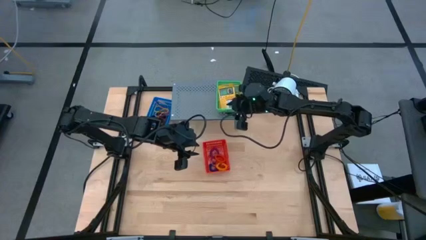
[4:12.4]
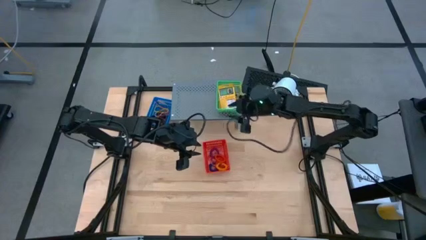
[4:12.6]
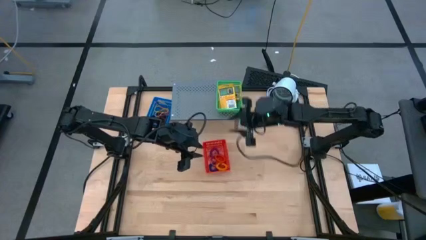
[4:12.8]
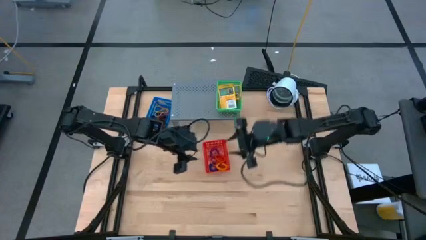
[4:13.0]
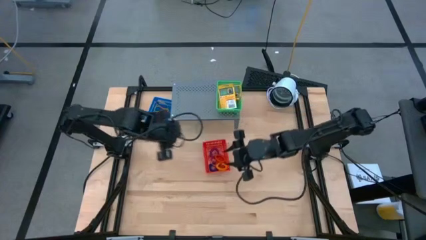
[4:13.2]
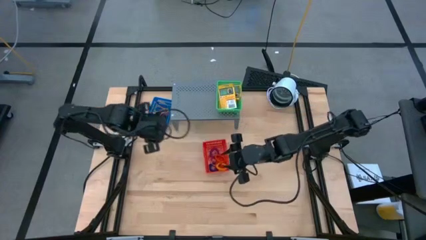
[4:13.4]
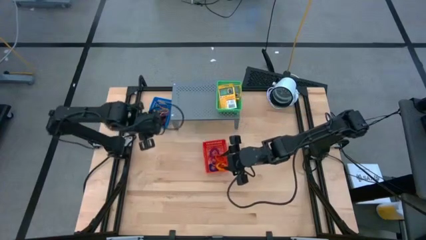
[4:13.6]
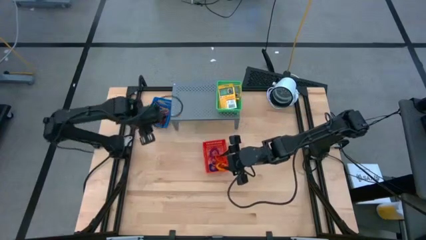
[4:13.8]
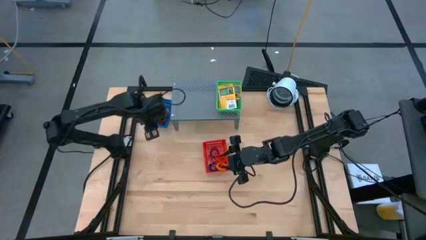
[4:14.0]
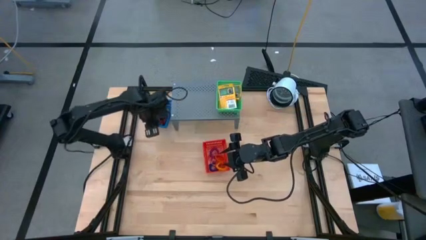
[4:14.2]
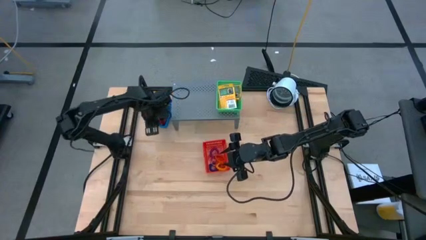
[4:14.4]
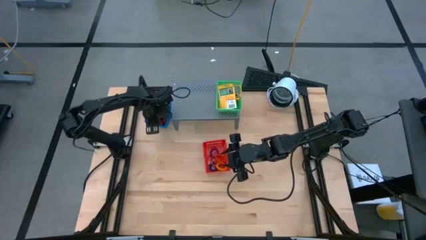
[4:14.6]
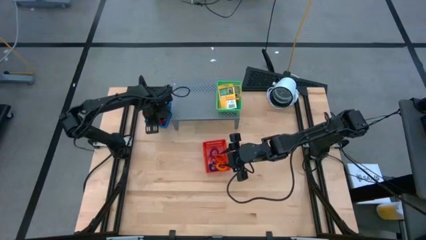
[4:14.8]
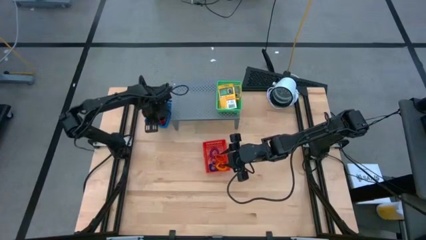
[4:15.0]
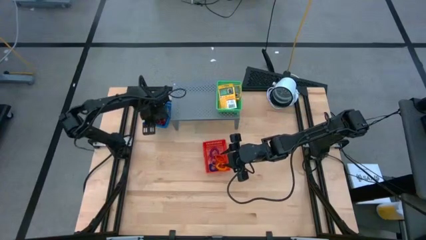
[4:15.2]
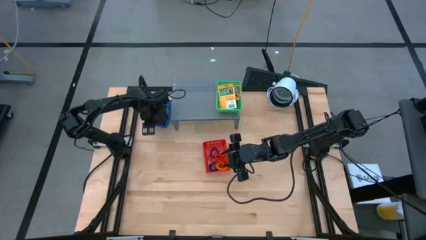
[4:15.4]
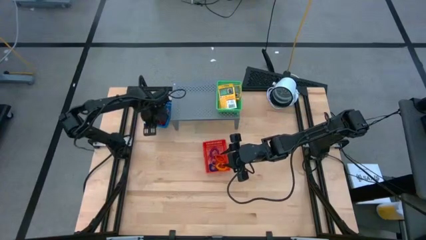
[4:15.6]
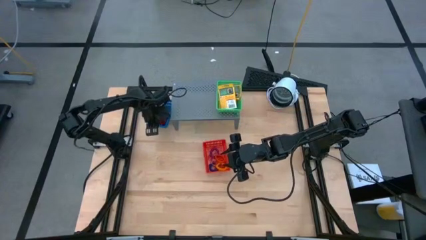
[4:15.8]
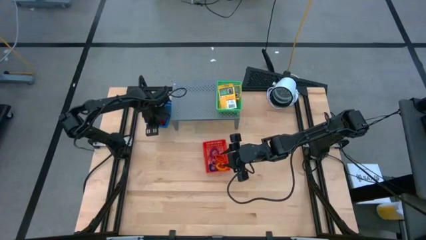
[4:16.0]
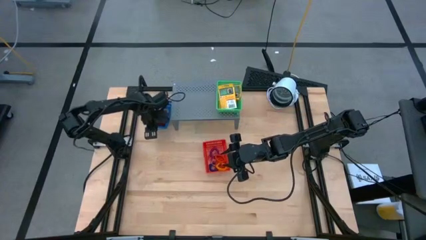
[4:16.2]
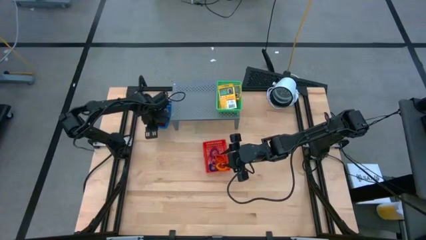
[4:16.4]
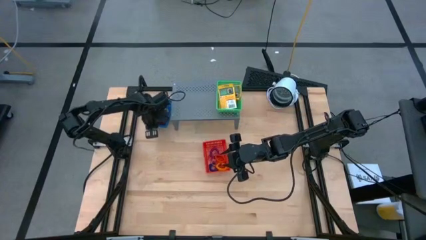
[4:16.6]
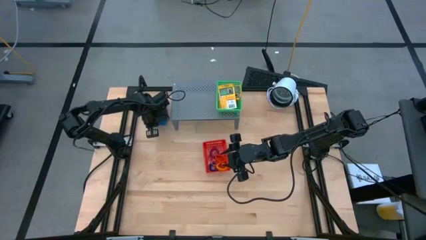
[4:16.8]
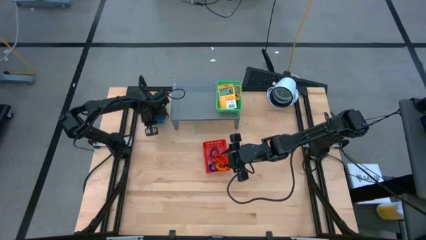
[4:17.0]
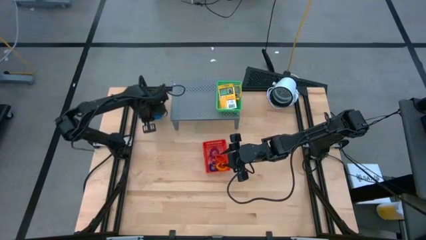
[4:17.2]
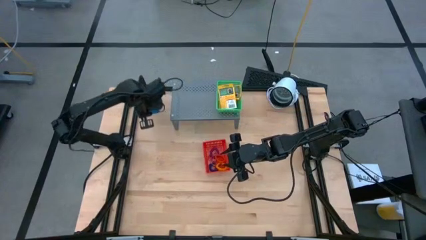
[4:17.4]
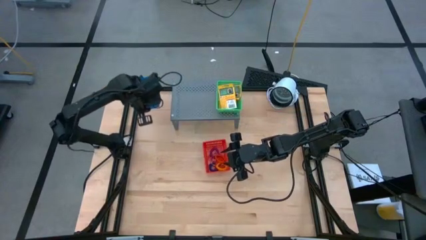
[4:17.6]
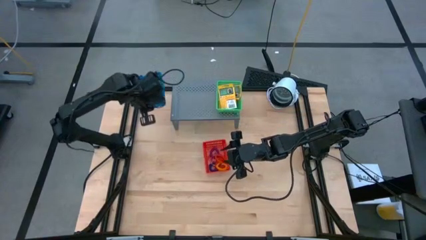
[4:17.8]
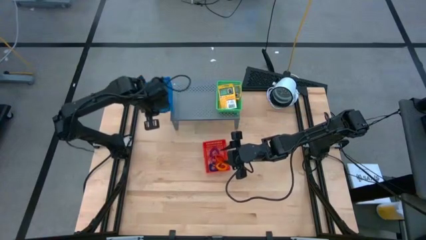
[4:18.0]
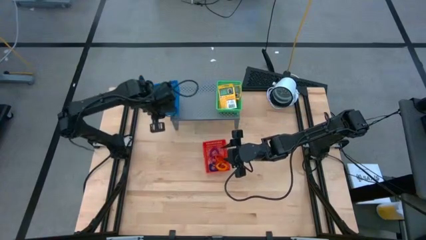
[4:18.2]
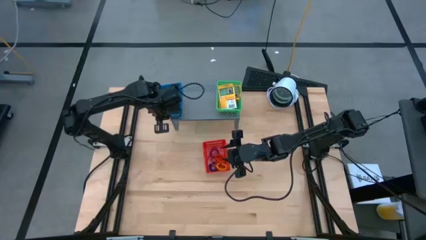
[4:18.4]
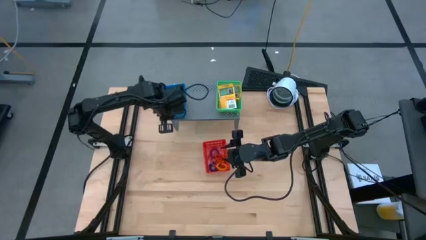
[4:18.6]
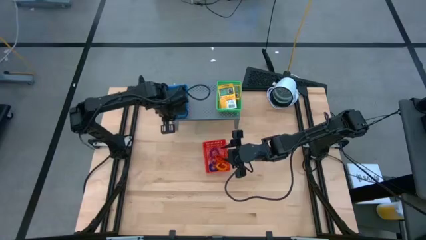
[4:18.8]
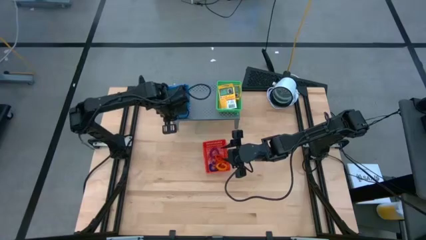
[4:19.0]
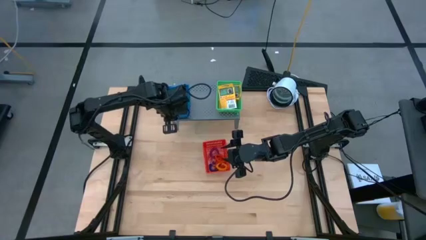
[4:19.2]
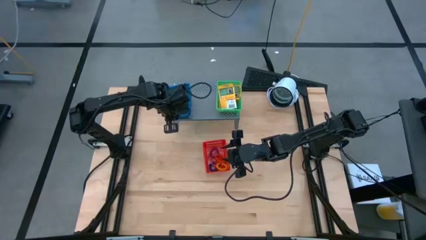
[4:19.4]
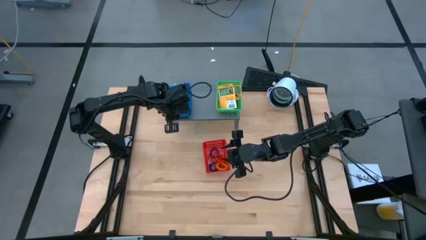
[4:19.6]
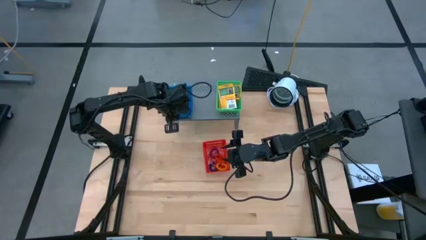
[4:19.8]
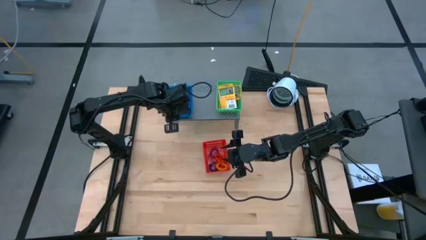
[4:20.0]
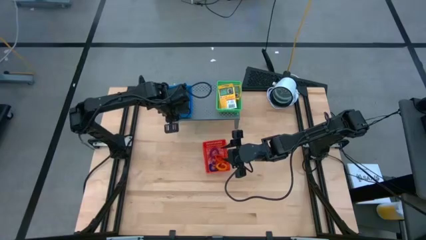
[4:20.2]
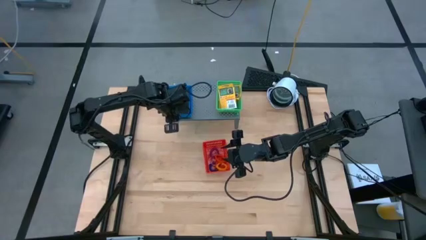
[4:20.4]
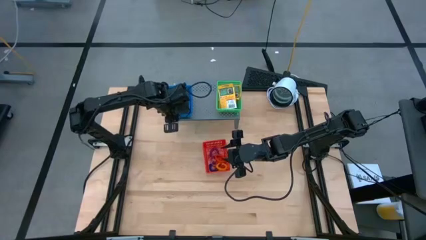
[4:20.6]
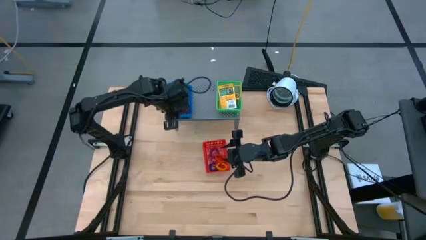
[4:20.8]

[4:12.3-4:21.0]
Task: Pick & Place Office Desk Supplies
Put the blue basket on the shelf

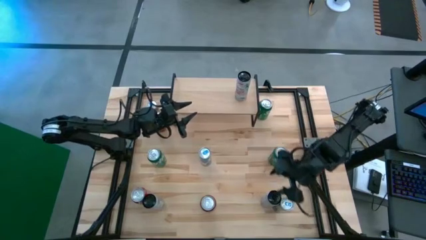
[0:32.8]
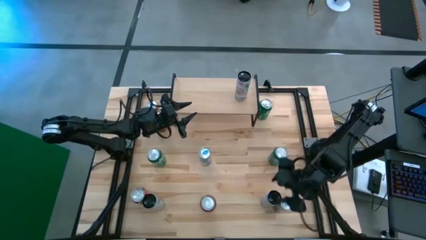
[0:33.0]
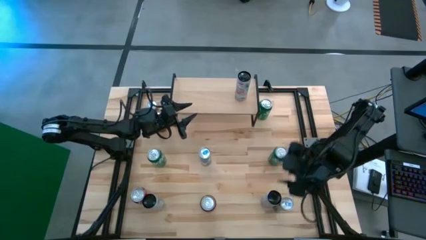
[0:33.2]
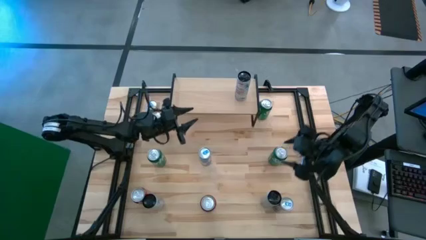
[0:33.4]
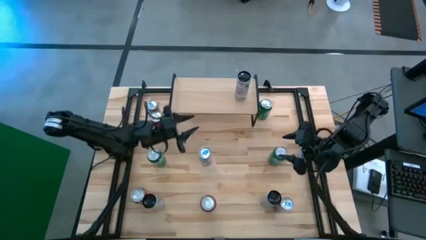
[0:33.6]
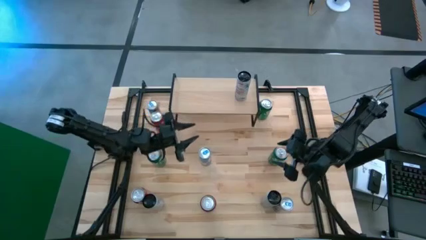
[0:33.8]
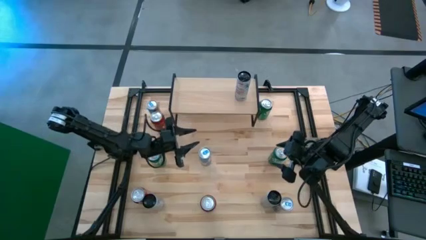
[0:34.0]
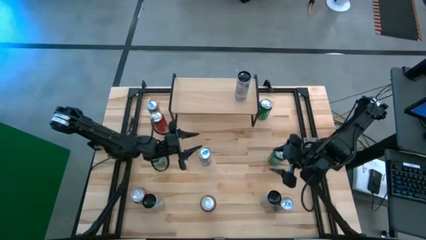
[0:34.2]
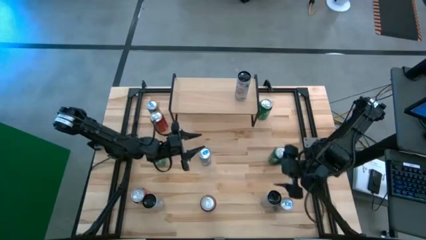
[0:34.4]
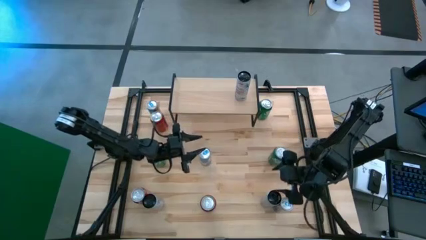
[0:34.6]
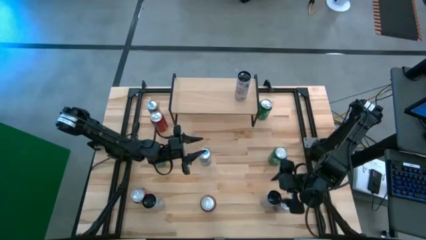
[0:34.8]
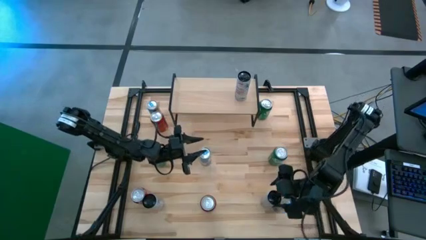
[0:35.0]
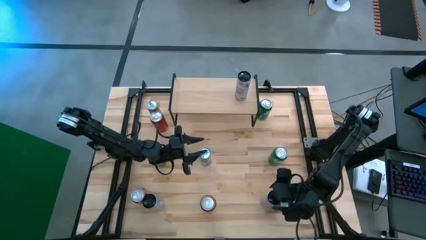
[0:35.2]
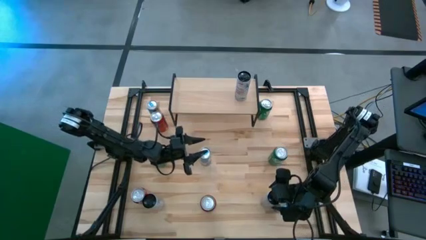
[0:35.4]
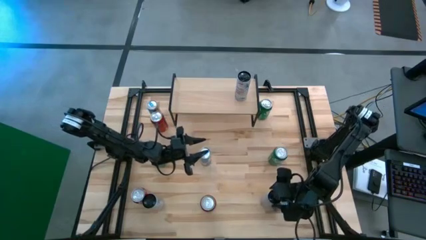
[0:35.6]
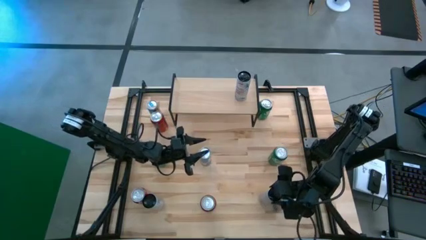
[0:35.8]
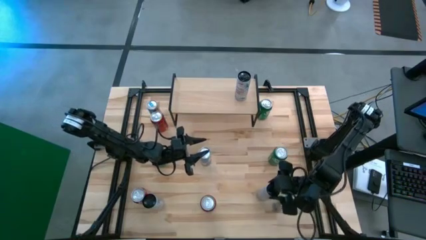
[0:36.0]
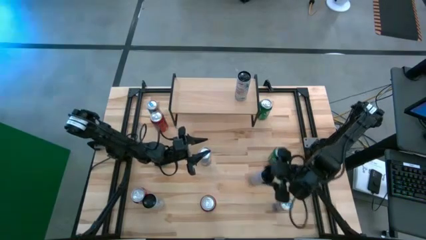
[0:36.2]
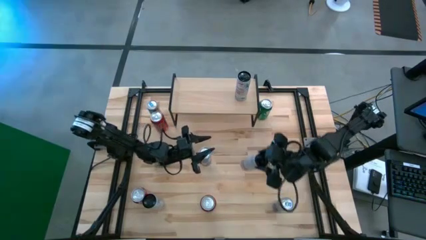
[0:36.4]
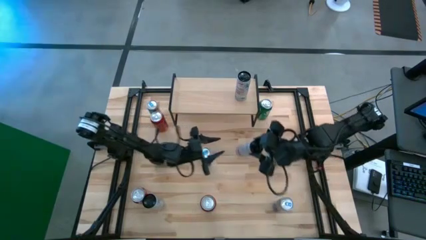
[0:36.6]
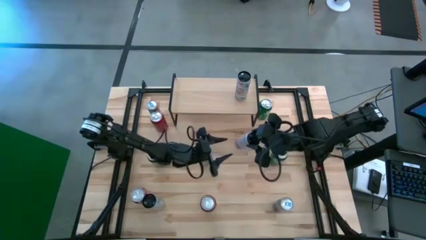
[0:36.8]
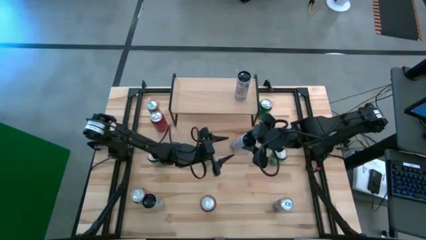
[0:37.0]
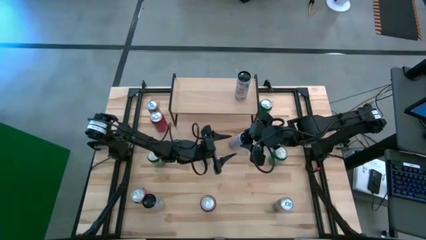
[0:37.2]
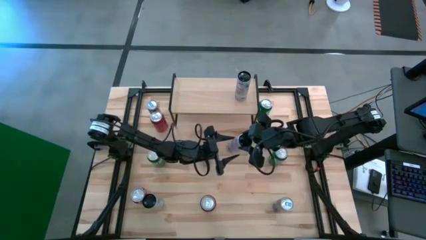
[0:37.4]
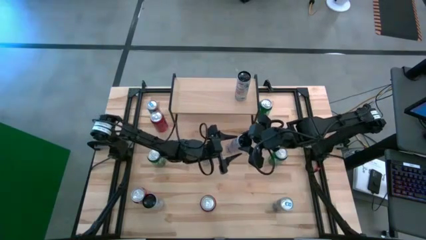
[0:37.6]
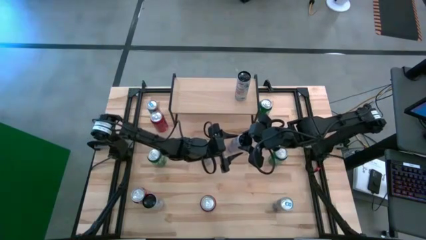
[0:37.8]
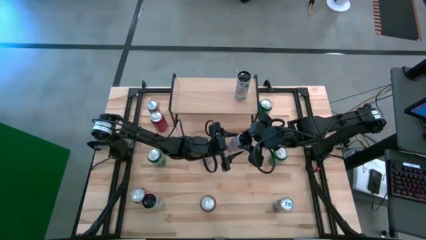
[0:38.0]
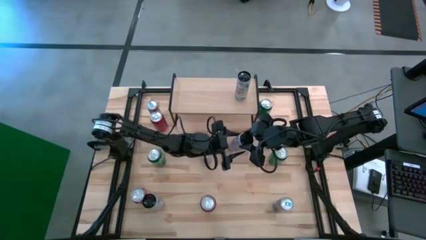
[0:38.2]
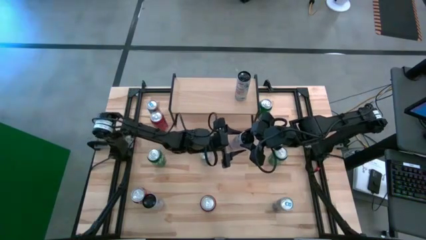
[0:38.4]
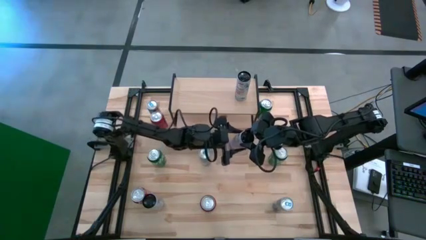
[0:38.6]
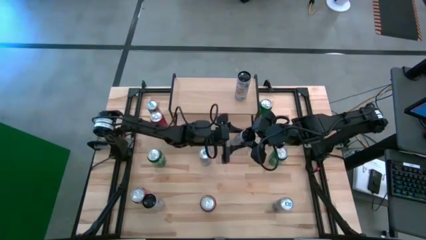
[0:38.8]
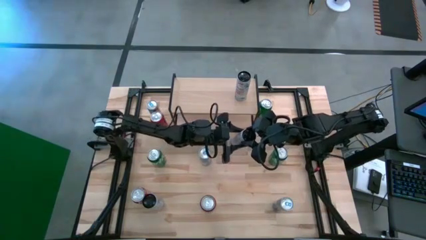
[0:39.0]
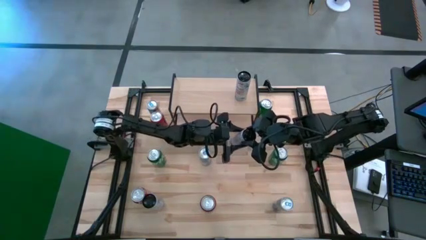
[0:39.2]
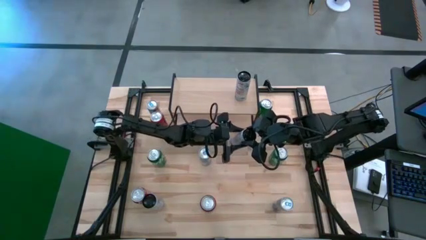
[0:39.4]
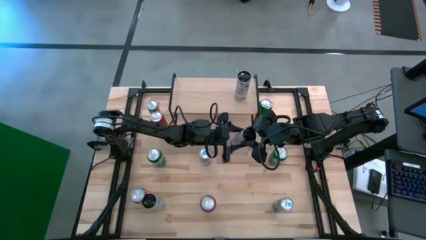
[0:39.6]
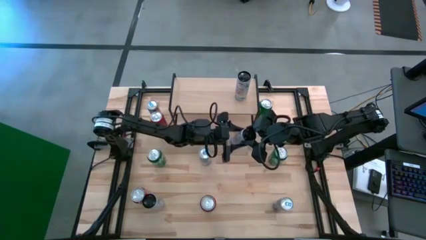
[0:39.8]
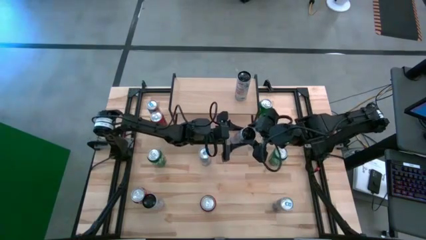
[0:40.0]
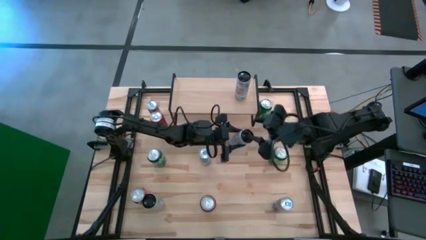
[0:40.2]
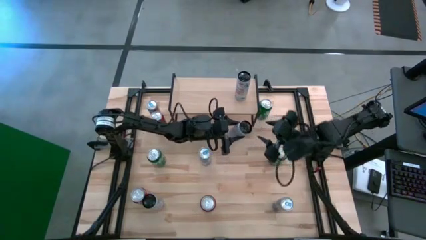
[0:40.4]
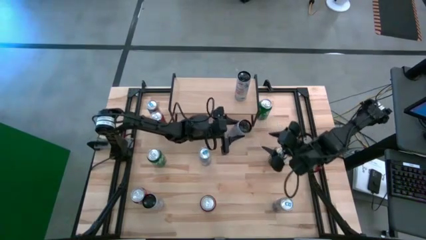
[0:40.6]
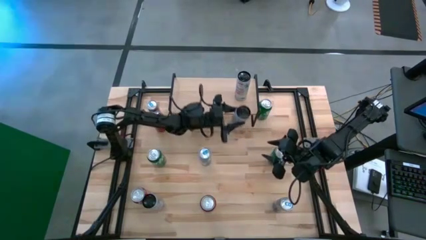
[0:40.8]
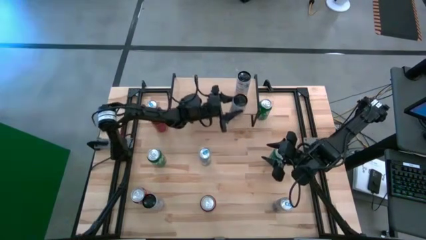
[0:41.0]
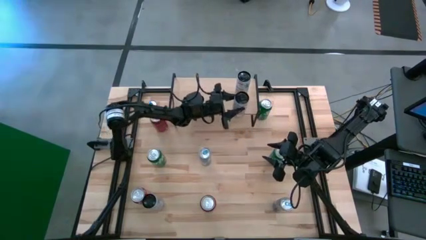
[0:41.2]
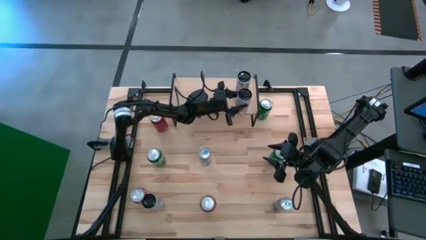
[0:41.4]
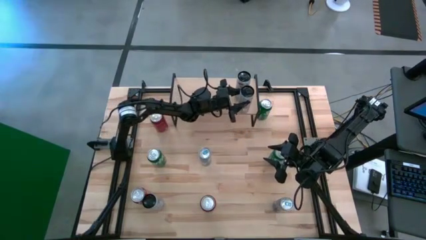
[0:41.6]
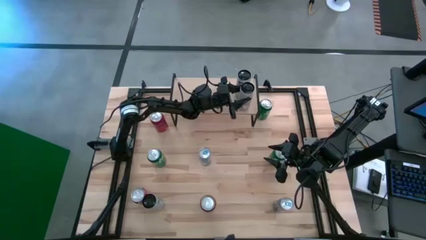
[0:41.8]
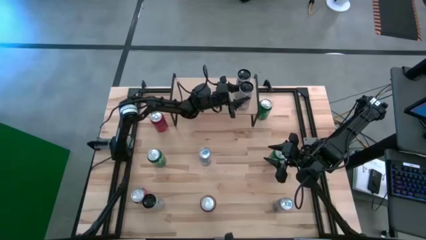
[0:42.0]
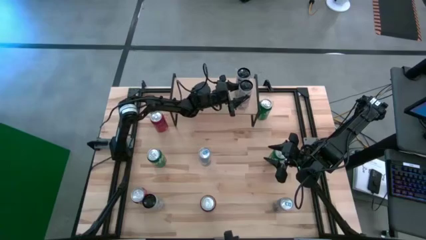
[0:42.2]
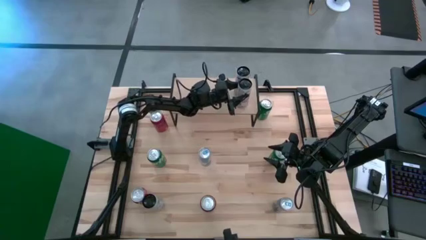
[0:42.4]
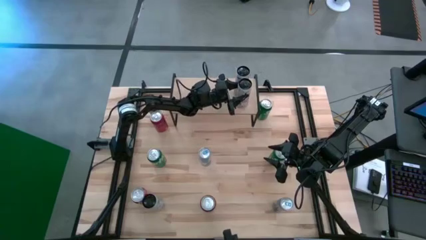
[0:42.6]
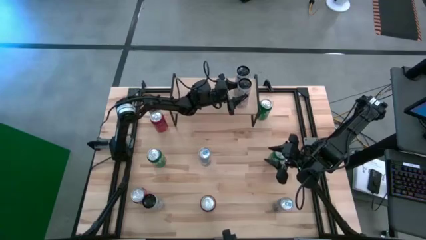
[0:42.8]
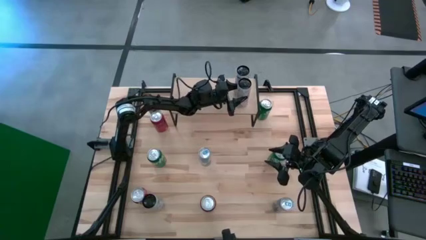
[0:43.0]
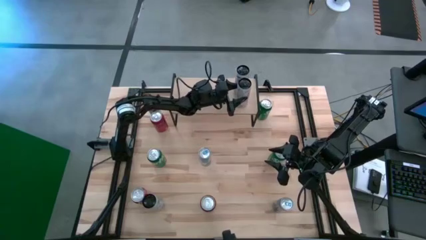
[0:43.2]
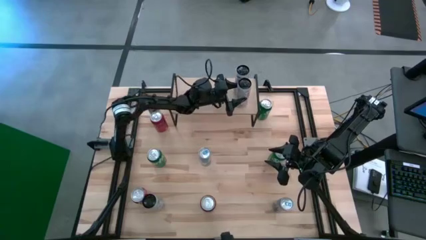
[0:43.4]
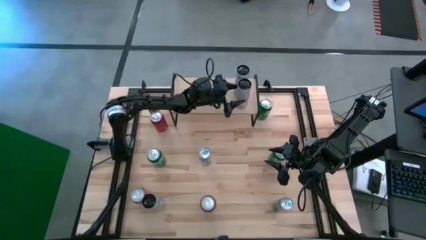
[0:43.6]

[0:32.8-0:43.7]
Task: Place canned beverage on shelf
Put the right white pink soda can on the shelf aligned with the other white pink soda can
